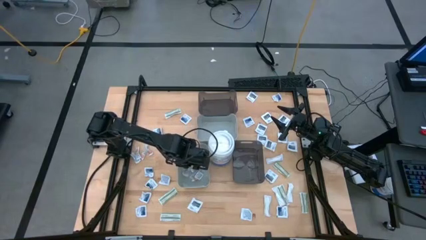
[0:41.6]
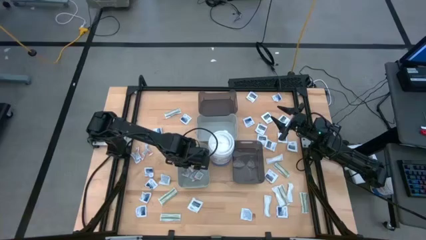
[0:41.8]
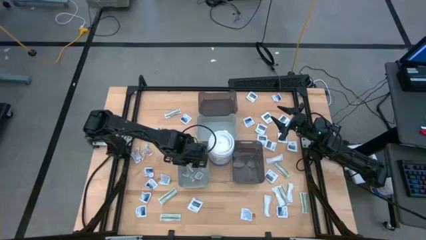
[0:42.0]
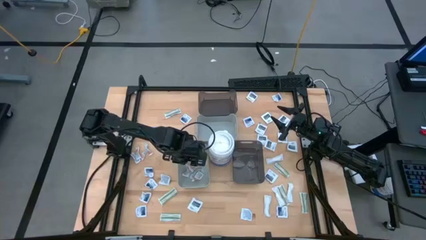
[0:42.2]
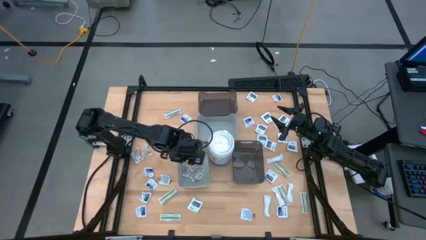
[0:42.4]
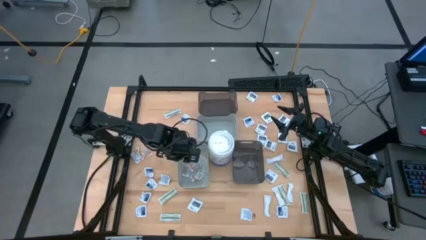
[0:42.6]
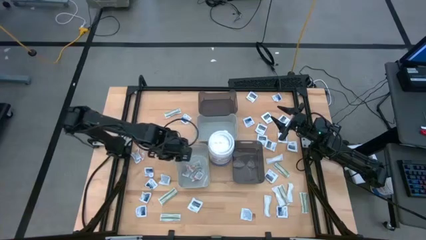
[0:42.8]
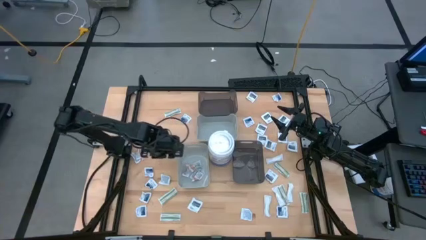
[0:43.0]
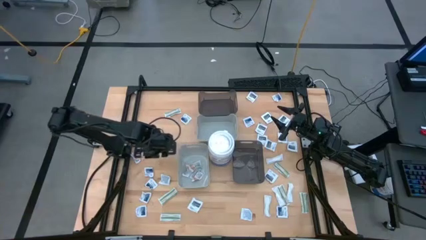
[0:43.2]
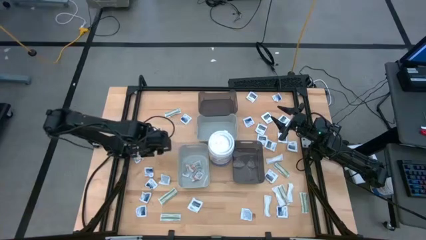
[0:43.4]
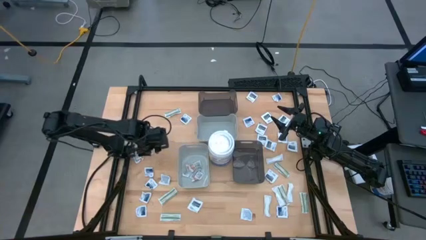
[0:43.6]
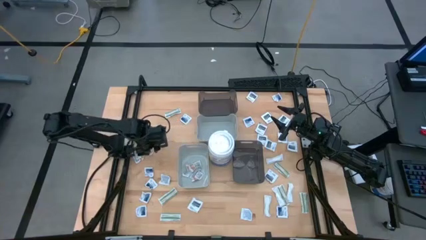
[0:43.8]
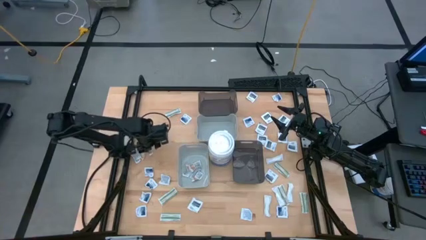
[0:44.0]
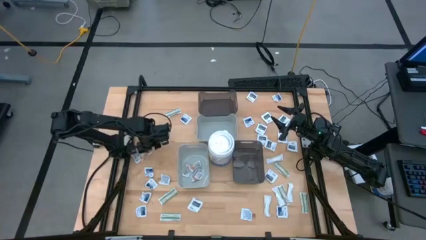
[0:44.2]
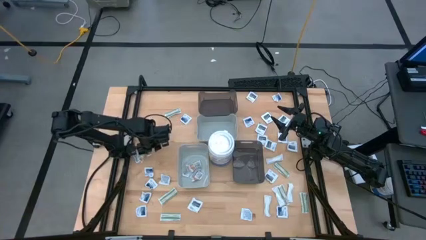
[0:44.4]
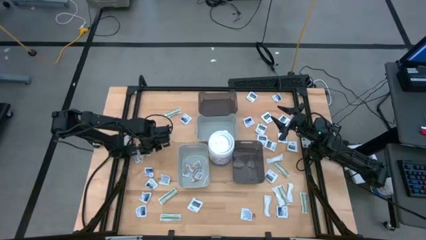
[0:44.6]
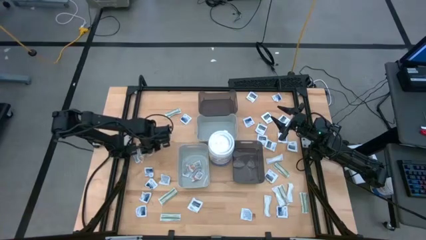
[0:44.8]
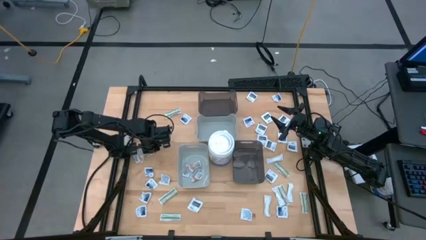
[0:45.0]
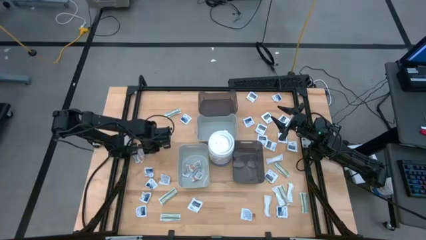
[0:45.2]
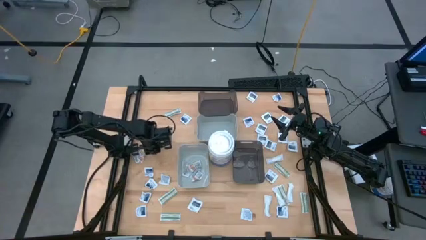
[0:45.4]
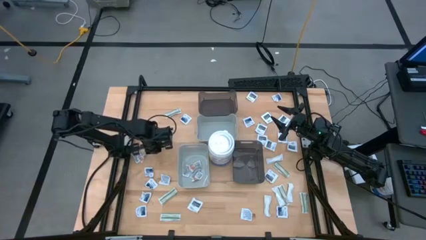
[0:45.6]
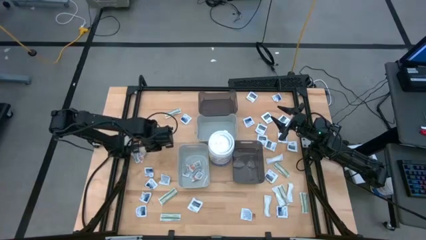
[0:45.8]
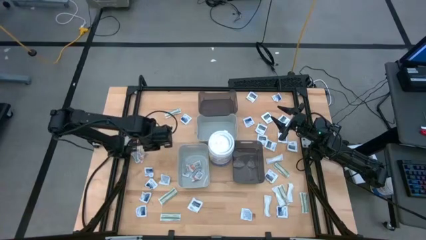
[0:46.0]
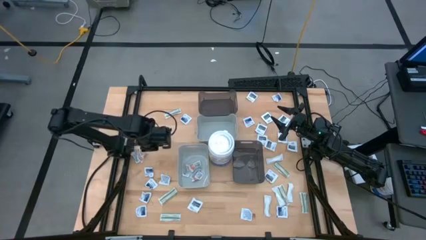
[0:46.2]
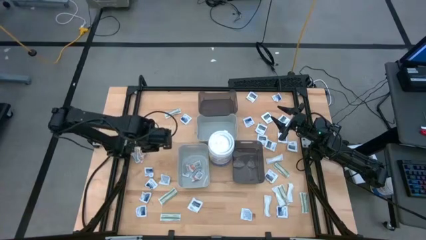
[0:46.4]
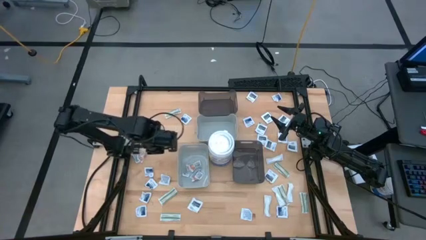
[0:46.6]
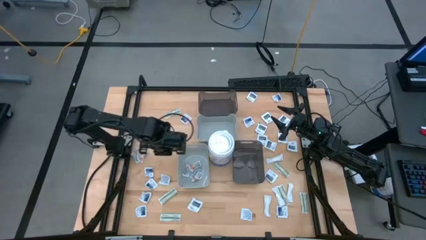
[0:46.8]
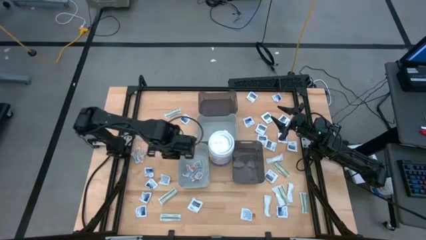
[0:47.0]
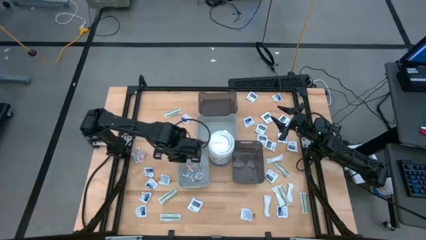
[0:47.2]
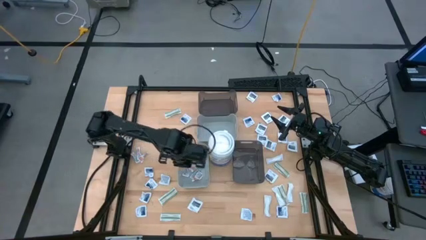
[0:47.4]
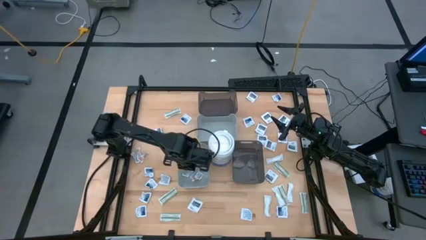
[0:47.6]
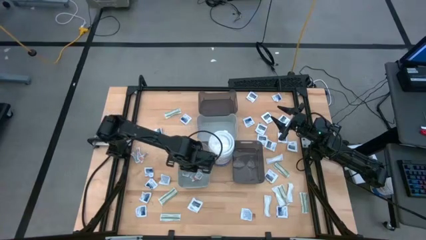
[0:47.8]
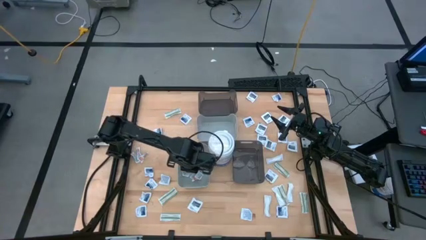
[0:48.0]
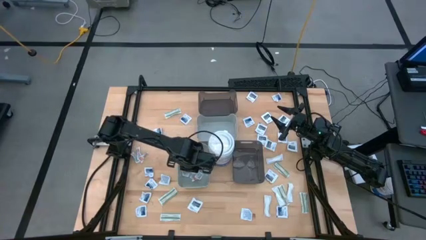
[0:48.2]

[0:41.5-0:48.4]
Task: Pick & Place First Aid Supplies
Put the ointment pack into the bottom gray bin

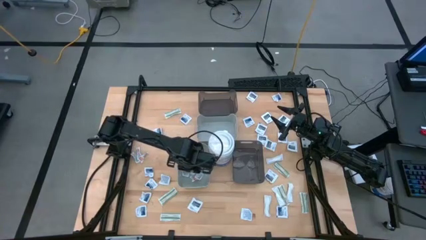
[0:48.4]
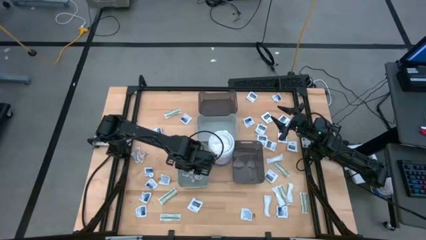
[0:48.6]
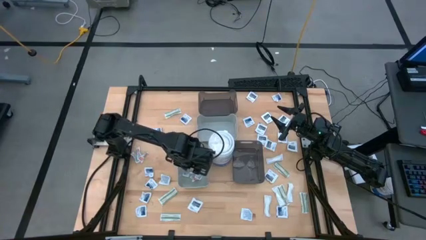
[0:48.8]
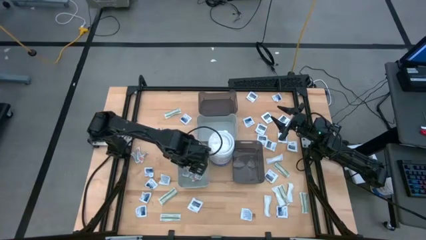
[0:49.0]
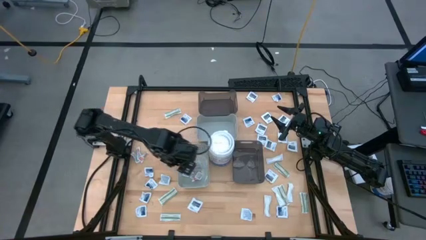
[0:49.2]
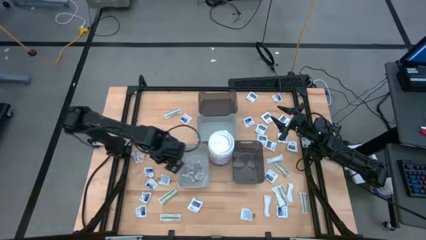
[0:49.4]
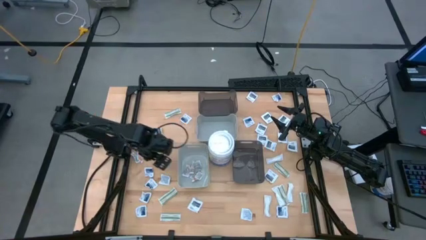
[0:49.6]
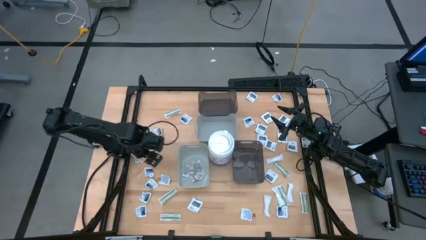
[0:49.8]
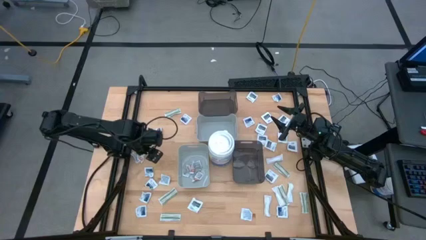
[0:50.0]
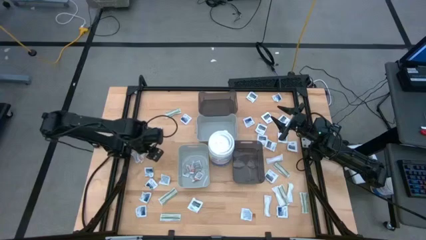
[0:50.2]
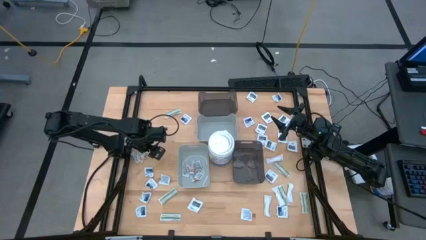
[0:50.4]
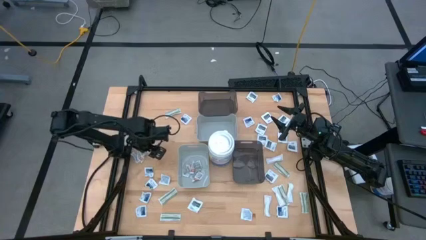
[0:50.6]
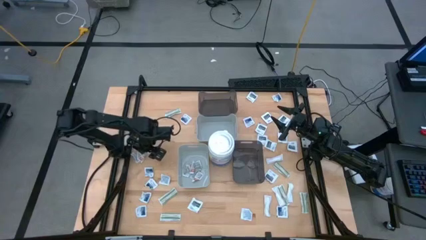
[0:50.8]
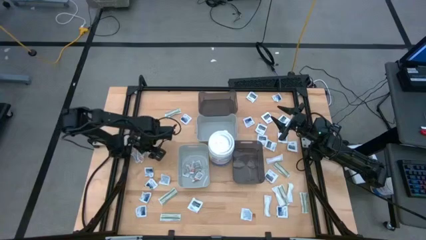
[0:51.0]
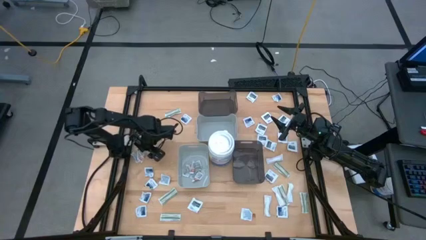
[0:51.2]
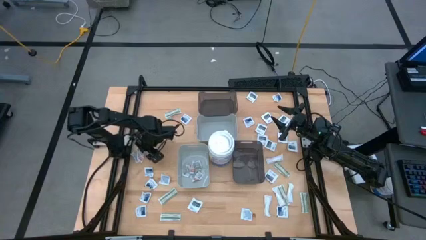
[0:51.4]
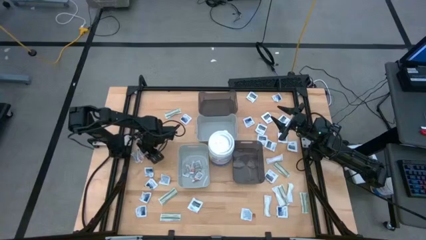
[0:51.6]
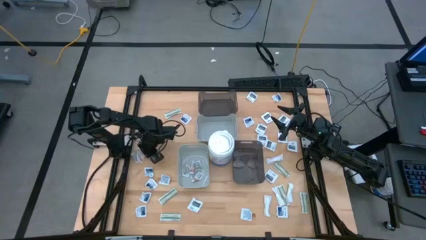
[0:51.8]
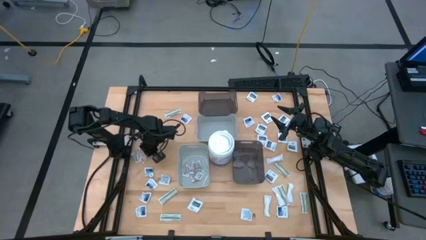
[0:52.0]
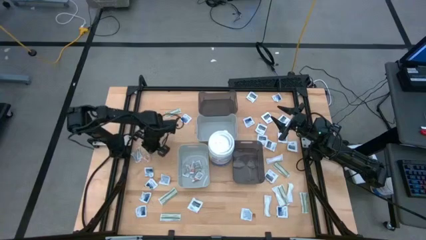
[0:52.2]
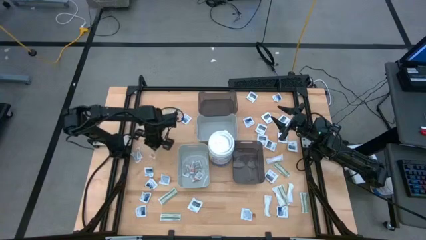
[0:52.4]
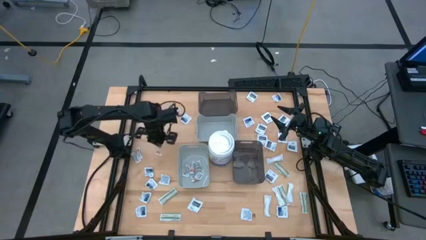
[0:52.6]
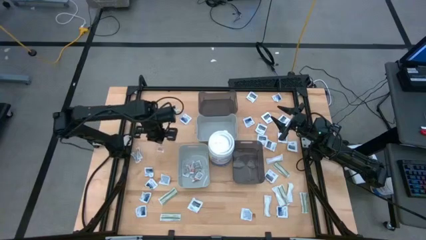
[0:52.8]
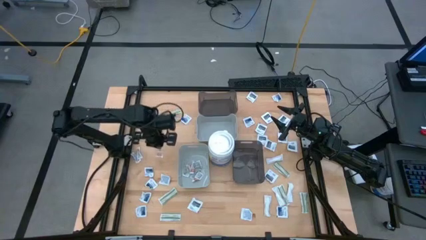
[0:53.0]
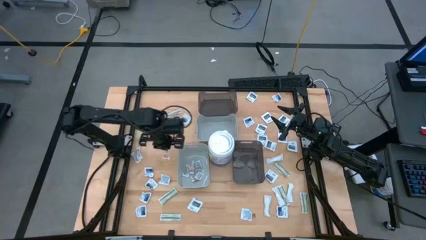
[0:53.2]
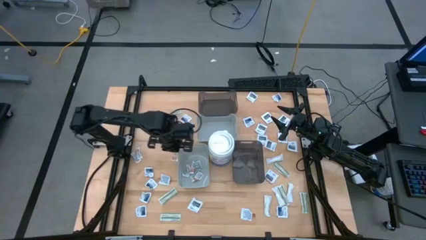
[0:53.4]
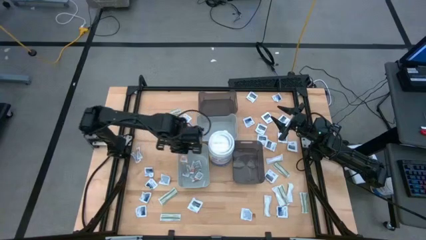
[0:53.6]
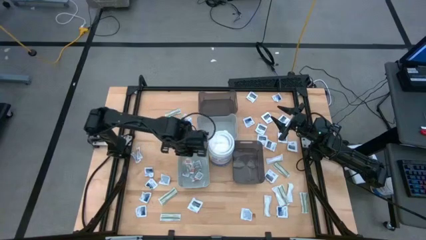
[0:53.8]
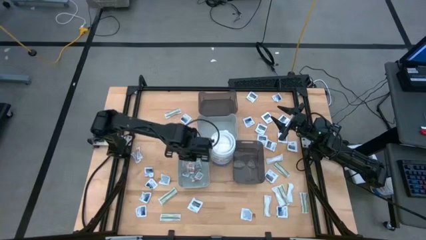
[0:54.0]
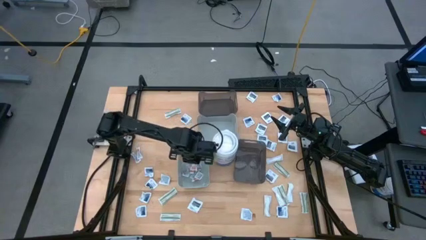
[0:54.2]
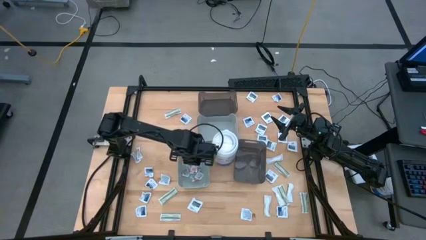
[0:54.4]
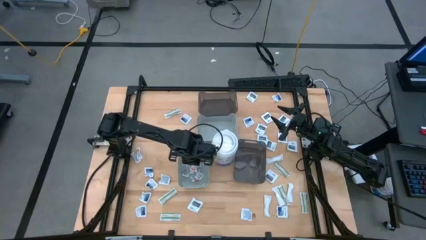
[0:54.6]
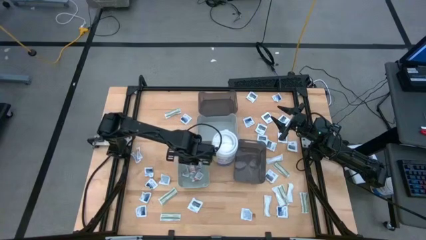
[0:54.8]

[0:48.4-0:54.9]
Put the ointment pack into the bottom gray bin

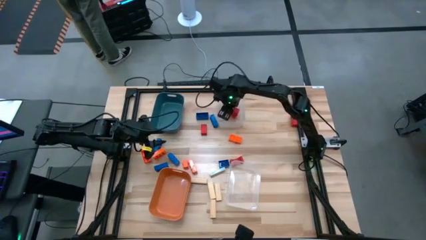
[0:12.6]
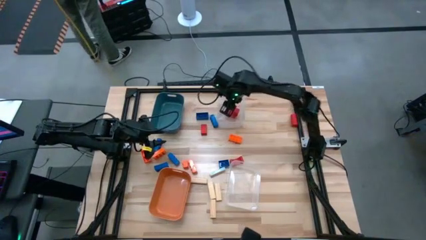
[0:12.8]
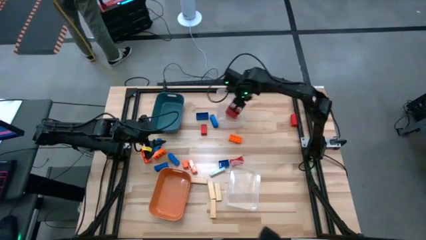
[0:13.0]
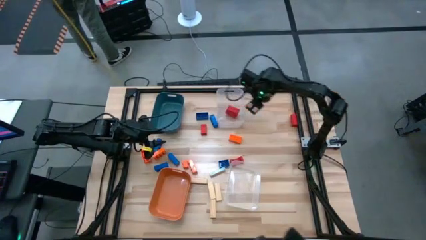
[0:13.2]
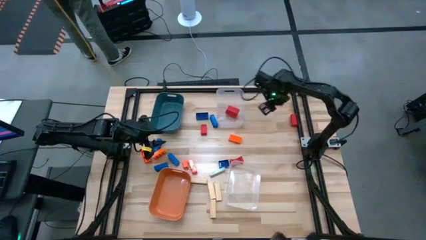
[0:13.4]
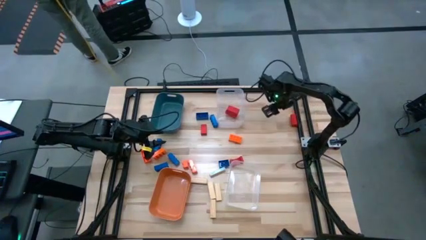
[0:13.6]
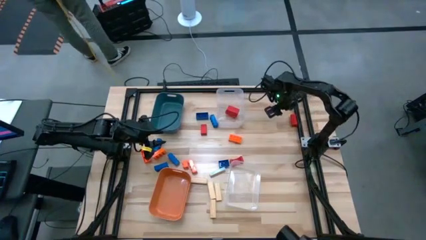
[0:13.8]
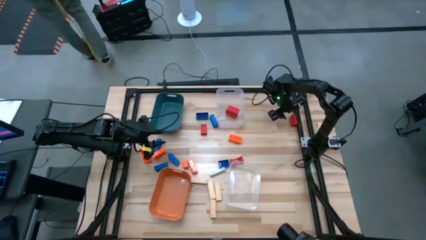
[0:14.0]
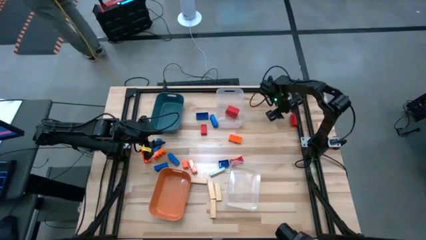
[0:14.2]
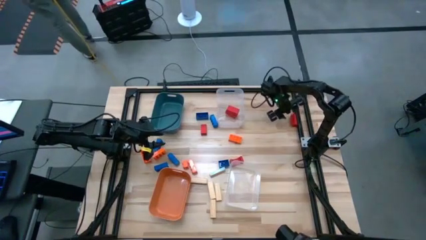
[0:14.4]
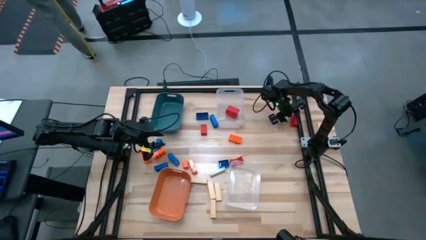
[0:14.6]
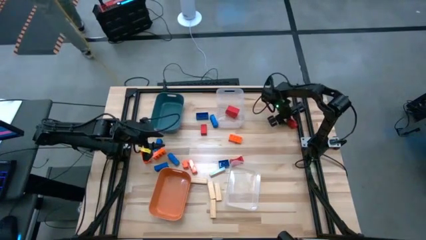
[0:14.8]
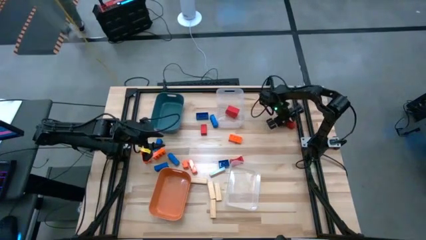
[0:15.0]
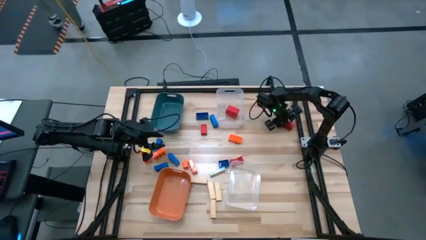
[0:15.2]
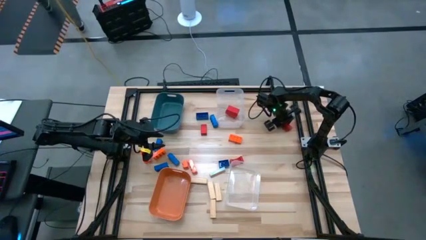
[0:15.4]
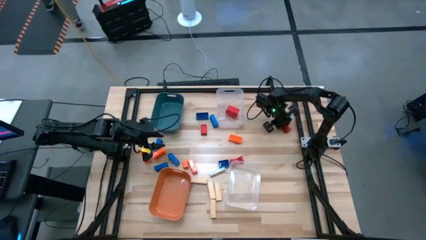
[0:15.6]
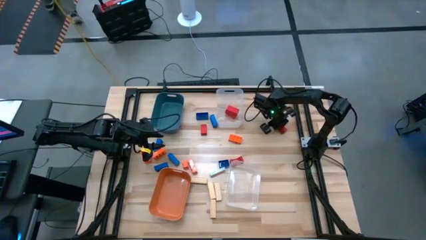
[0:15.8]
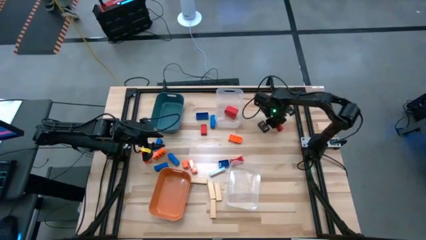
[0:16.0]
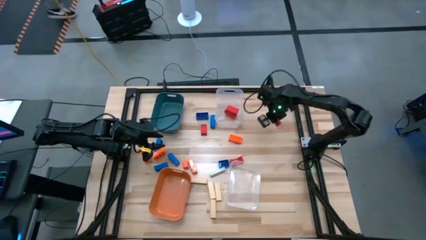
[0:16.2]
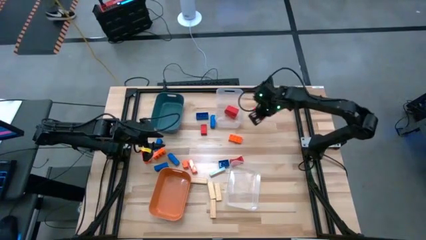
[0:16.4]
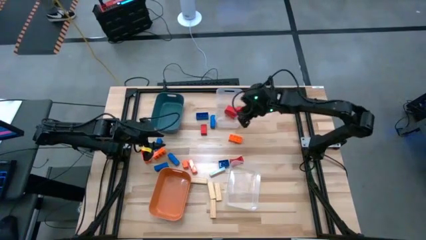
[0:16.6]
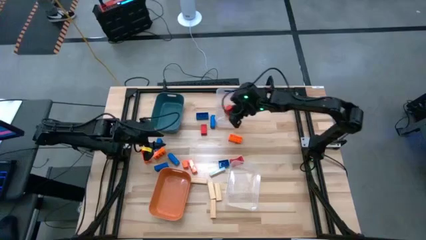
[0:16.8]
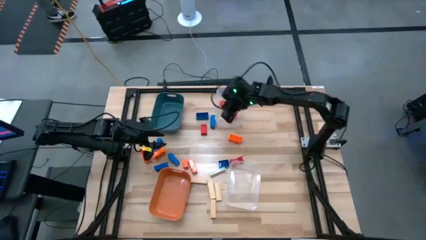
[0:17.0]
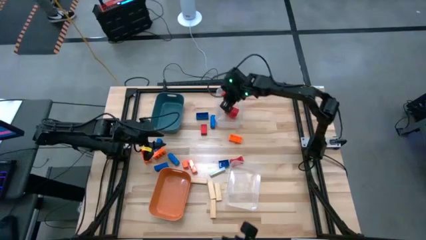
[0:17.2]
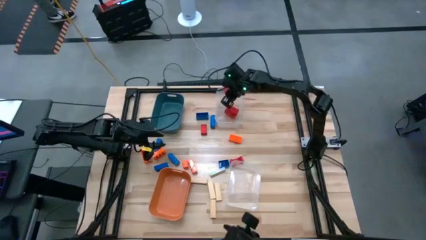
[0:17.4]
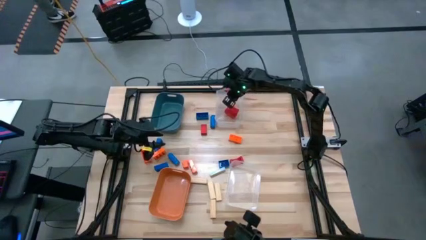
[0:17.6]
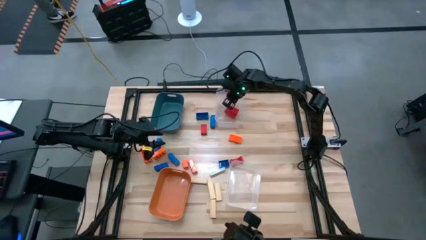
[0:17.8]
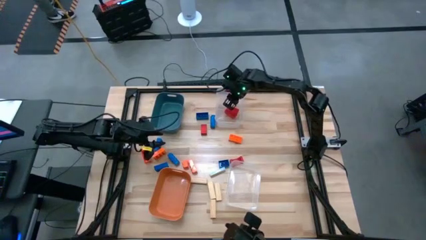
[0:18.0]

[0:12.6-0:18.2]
Task: Sort blocks
Put the red wooden block into the top transparent bin
